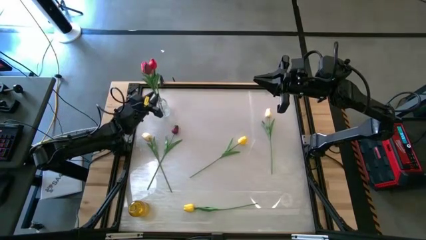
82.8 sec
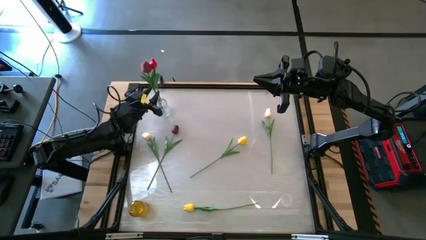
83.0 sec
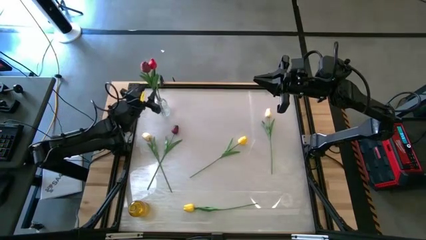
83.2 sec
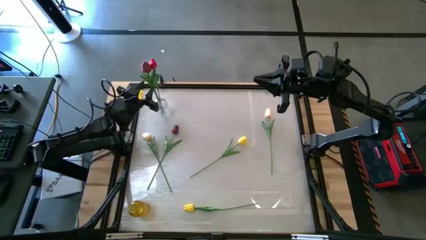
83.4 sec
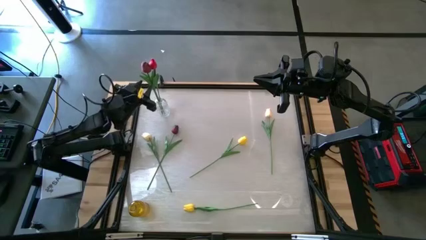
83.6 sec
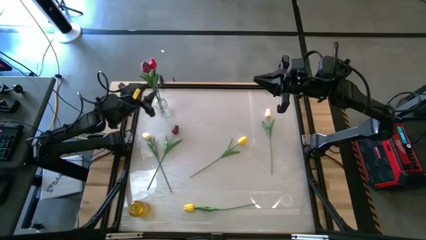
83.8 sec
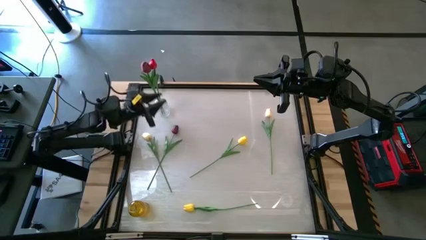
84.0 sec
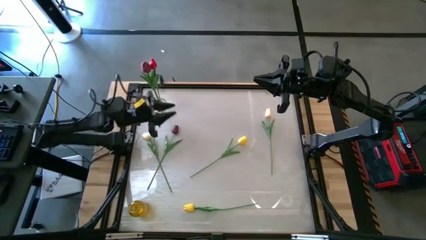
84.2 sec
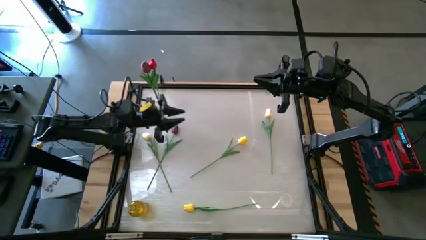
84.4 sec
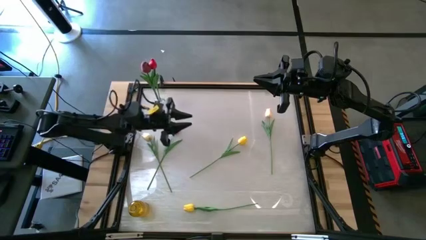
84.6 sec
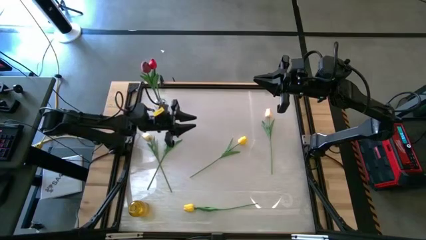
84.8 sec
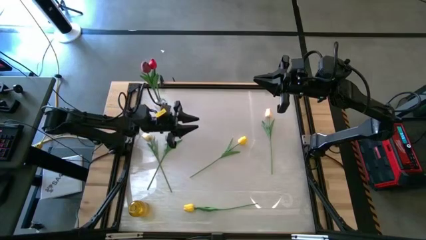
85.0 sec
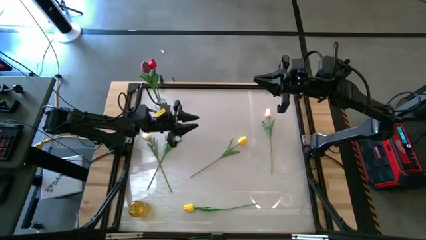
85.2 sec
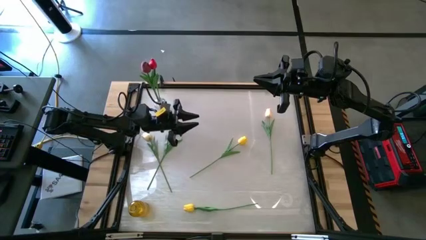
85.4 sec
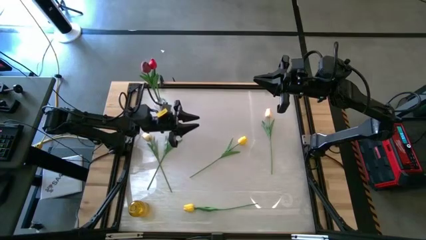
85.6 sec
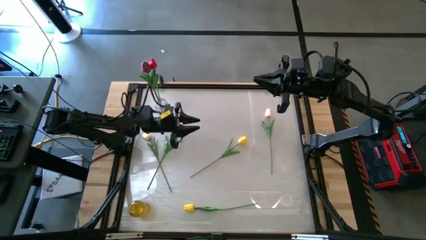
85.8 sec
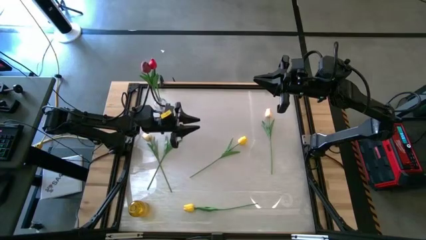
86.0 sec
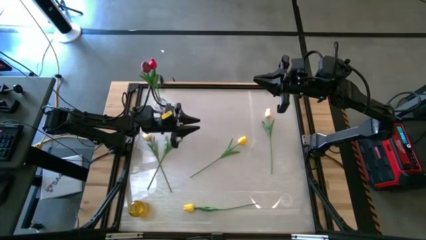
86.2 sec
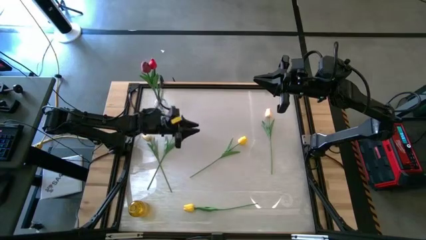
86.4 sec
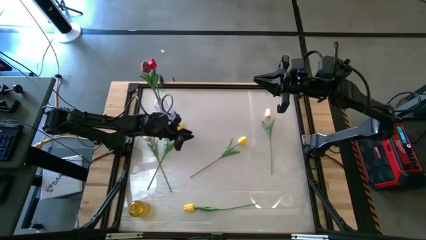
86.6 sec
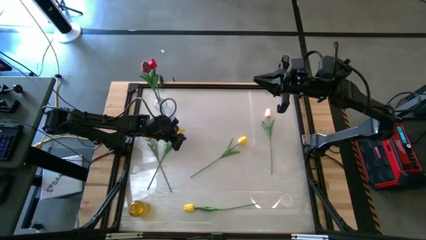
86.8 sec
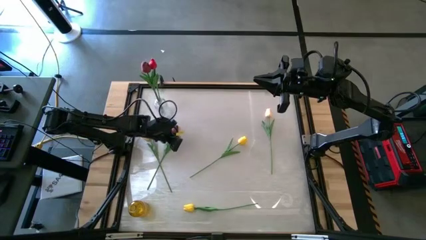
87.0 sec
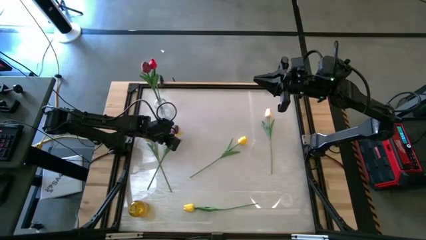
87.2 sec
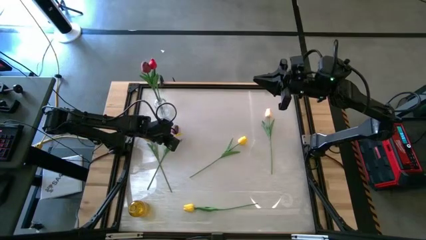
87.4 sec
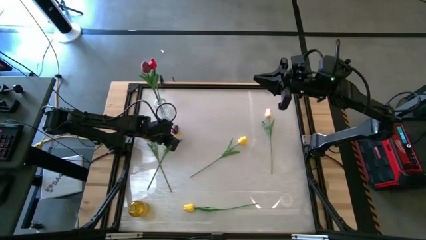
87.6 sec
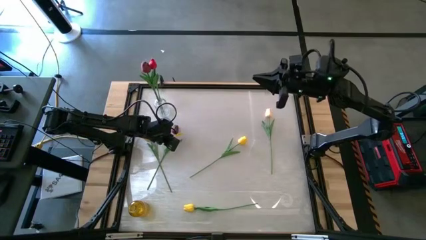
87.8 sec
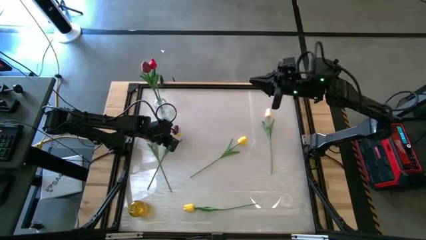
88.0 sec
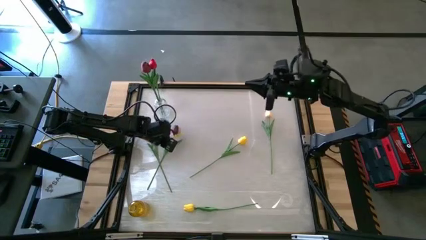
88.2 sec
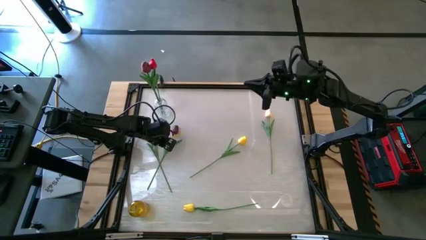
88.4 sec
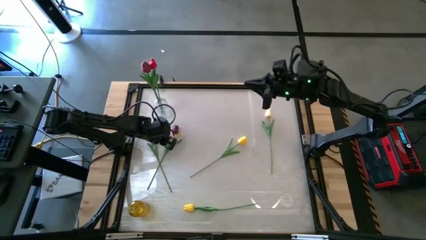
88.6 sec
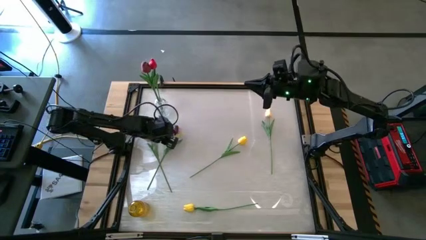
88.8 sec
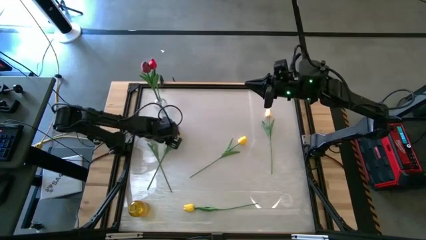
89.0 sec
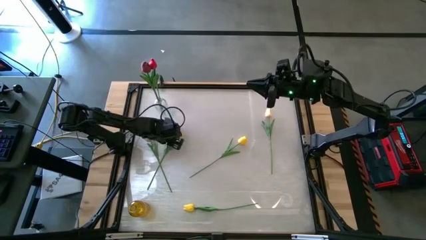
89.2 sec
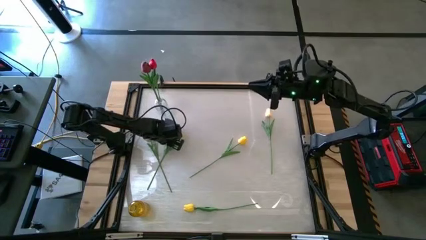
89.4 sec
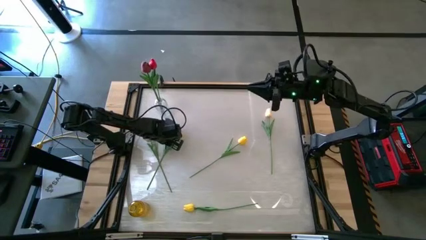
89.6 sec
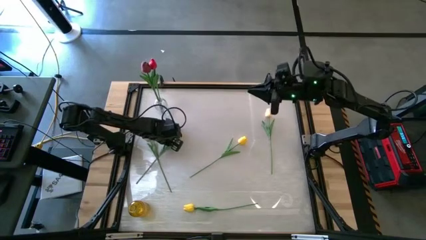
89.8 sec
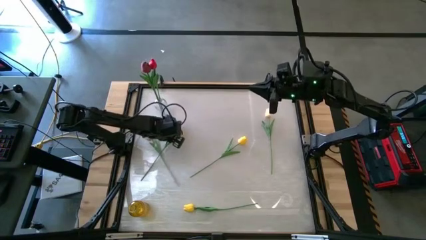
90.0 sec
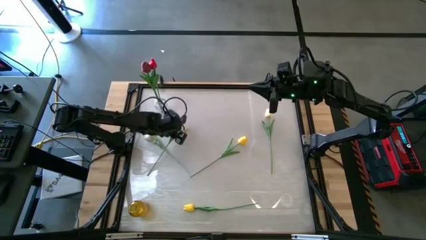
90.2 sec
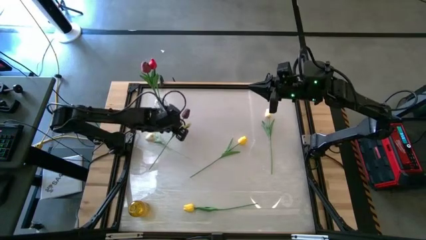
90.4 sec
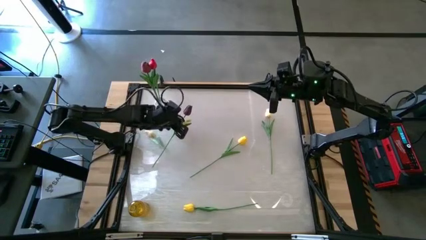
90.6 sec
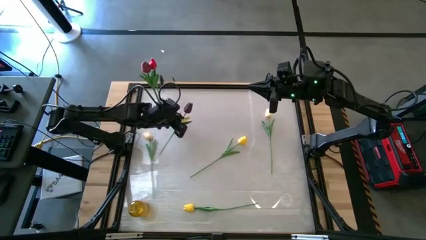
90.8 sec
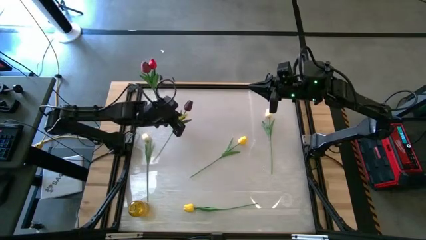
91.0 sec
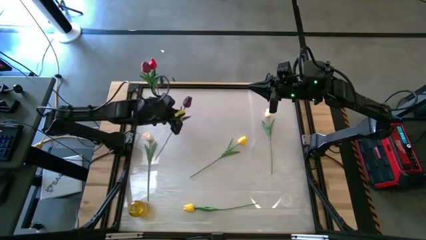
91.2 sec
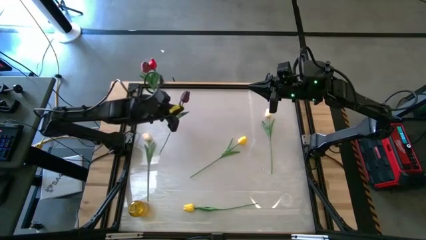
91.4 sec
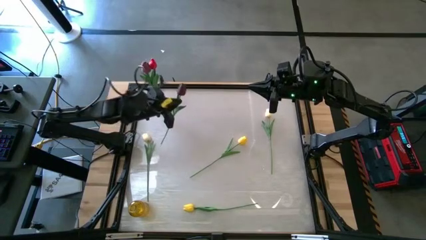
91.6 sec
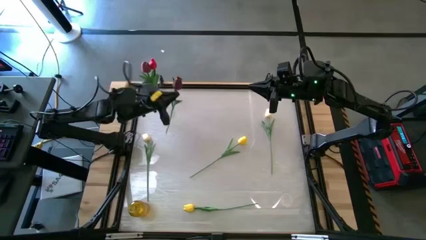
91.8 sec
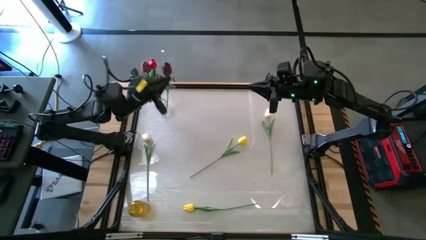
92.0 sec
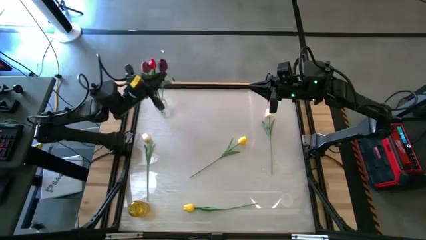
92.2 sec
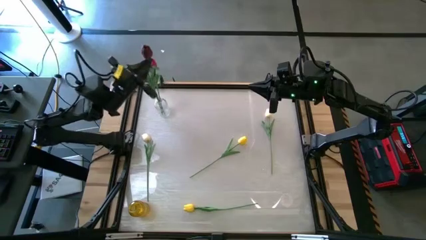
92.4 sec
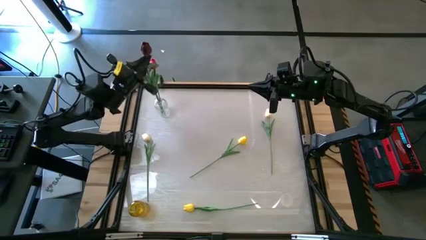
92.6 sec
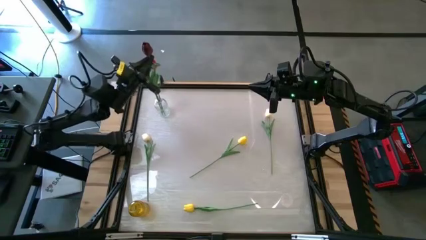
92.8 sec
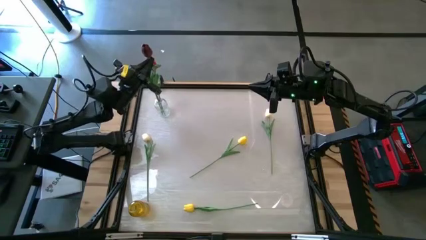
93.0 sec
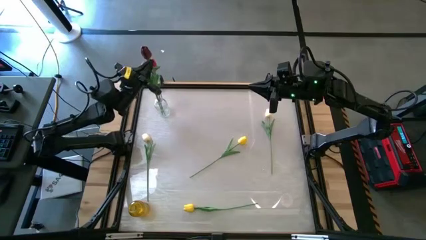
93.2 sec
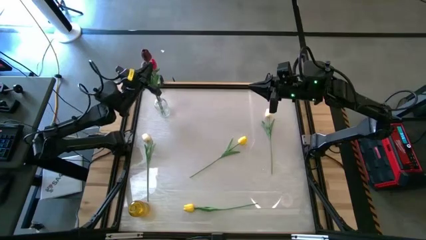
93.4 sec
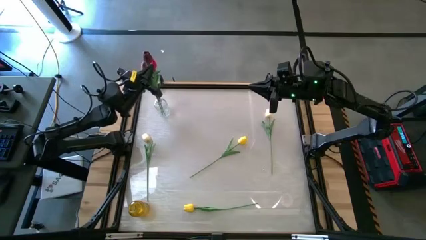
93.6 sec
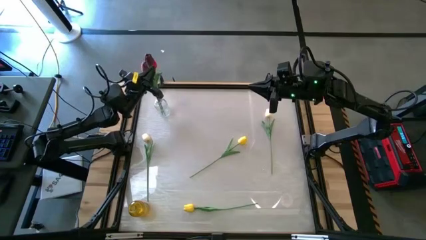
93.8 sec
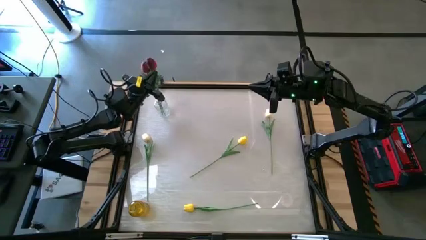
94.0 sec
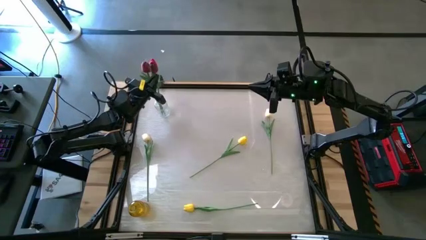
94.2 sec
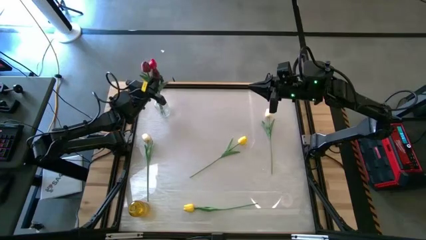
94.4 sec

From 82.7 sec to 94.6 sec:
Task: Sort flowers into vase by color
Put the dark red flower into the transparent vase

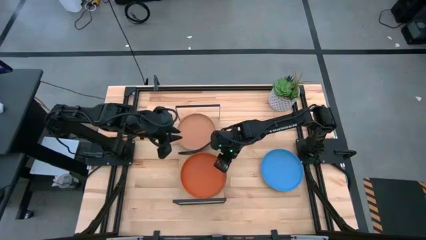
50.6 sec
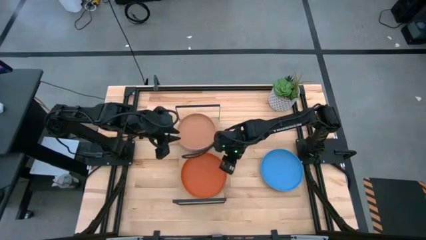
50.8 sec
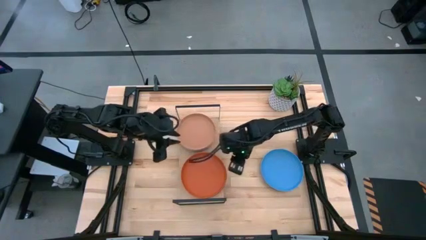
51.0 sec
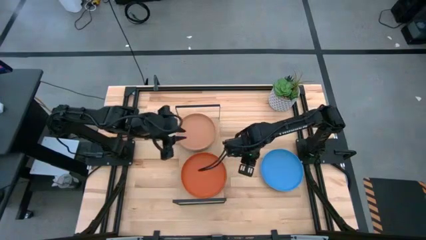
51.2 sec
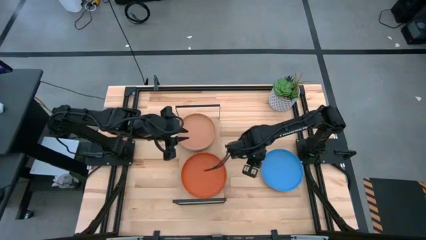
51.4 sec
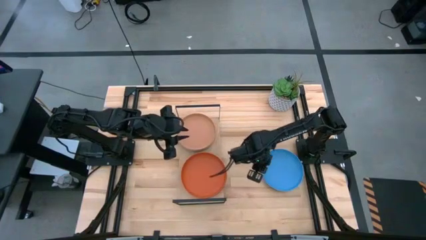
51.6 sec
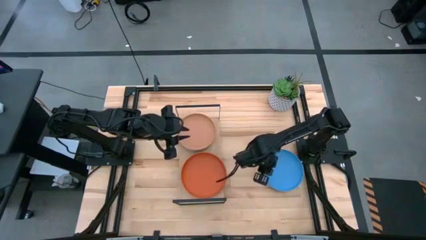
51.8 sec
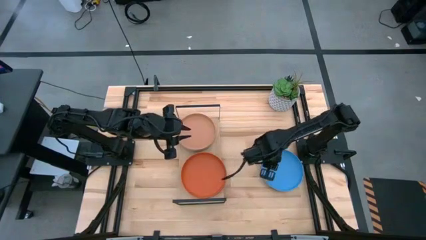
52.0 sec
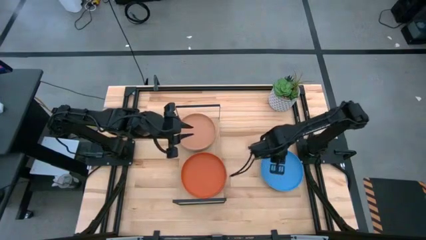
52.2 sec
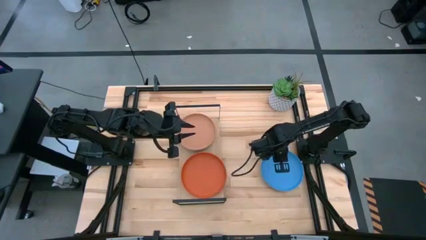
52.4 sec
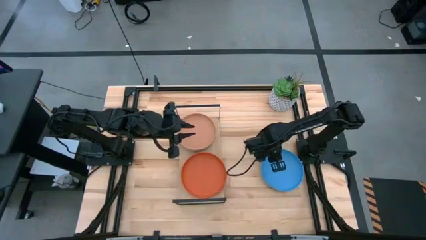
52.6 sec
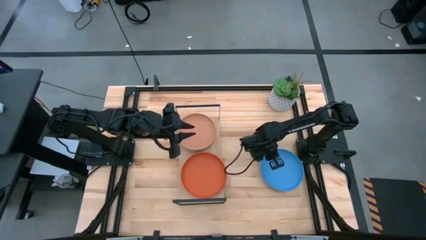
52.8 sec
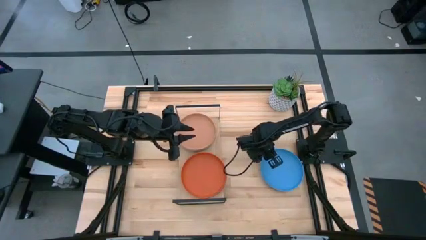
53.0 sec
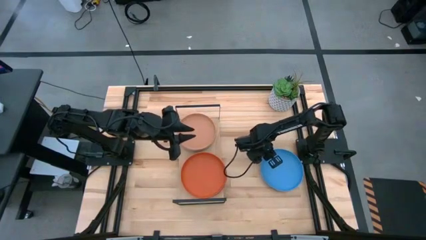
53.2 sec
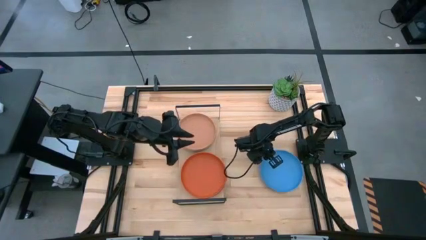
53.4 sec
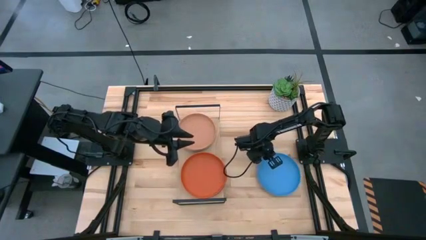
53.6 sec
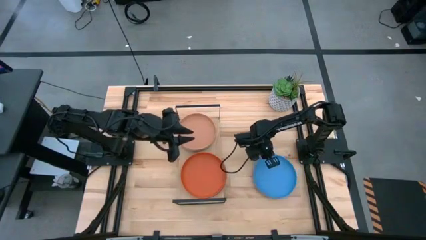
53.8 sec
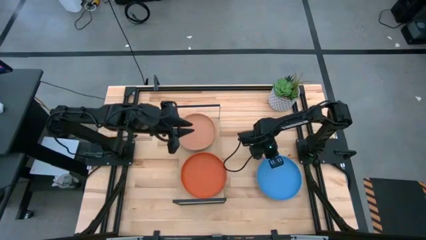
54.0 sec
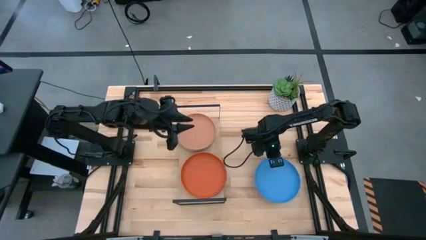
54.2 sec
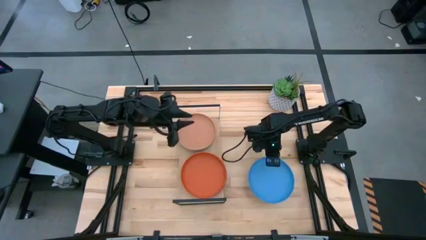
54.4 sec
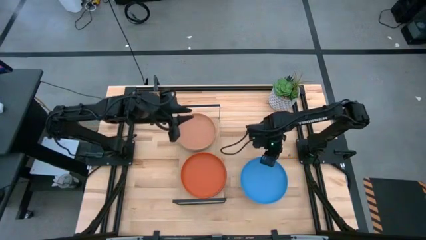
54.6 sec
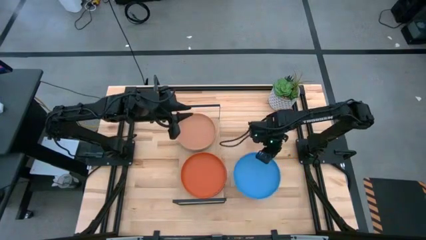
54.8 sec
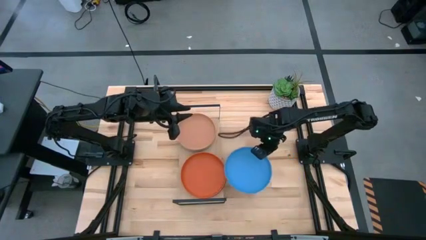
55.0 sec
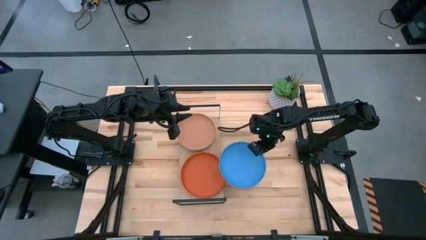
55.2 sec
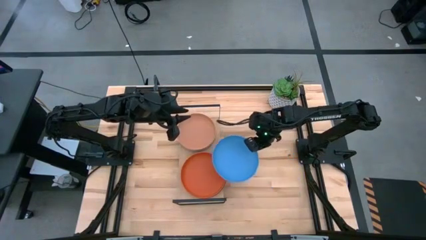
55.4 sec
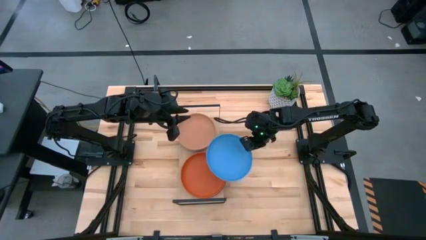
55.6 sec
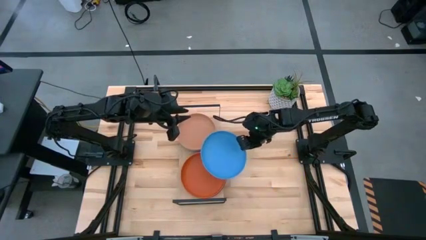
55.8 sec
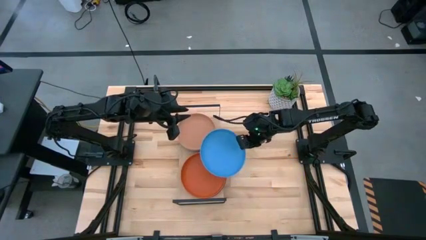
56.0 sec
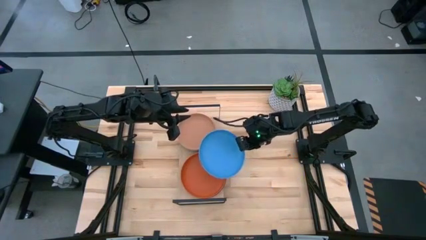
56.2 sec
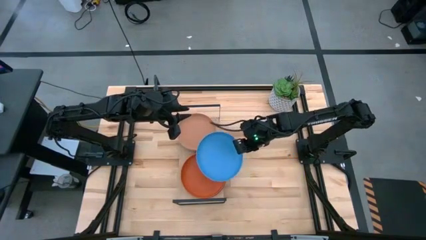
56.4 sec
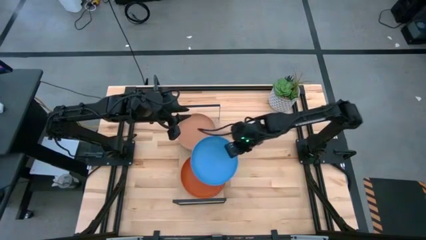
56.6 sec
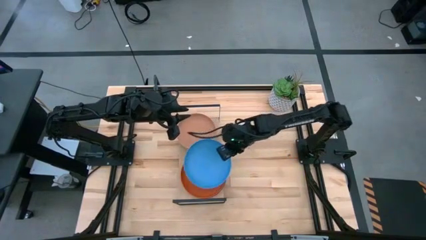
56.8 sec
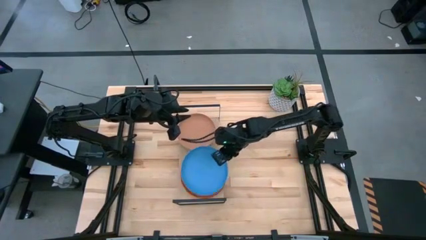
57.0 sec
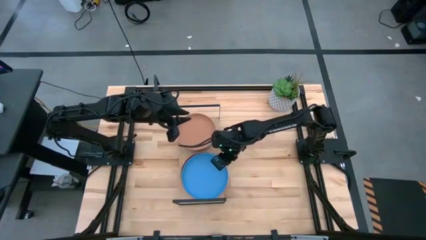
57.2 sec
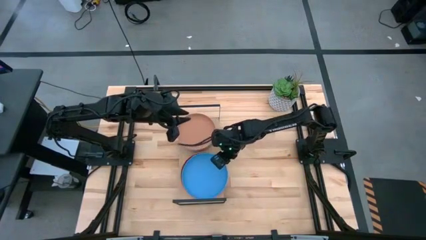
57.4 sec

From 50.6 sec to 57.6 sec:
Task: Place and stack plates onto a shelf
Stack the blue plate on top of the orange plate on the shelf
